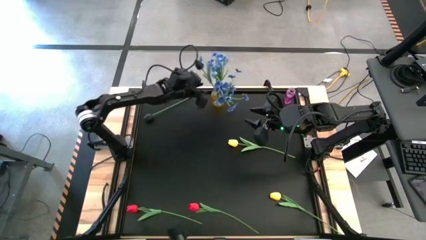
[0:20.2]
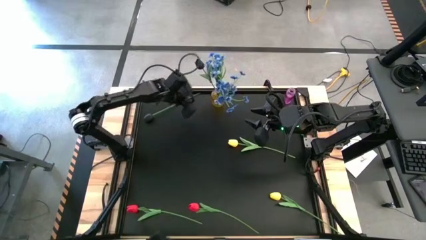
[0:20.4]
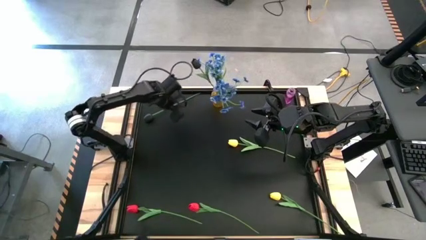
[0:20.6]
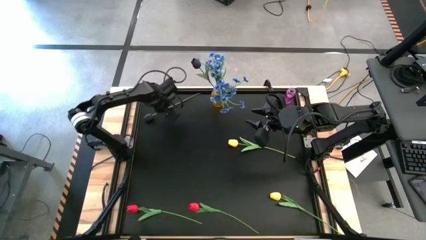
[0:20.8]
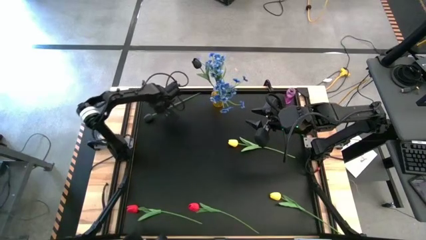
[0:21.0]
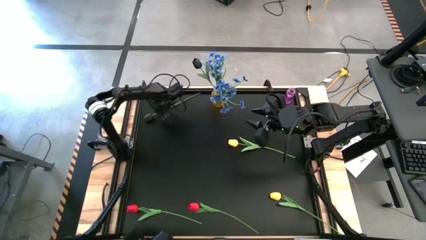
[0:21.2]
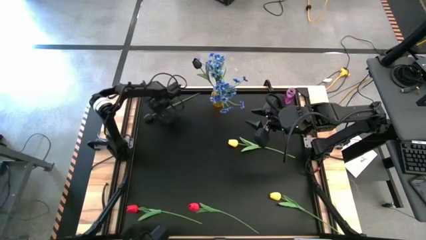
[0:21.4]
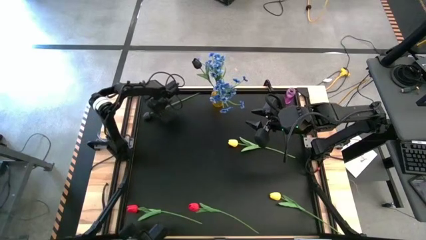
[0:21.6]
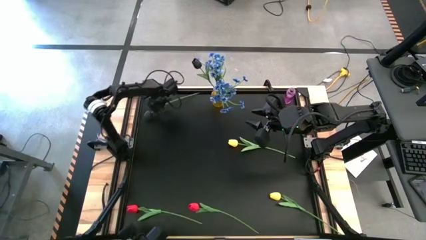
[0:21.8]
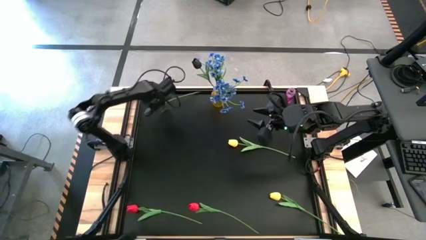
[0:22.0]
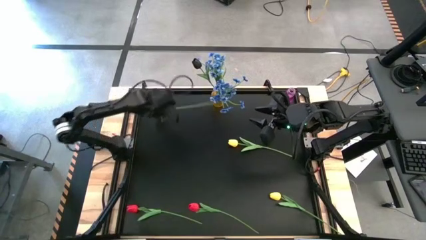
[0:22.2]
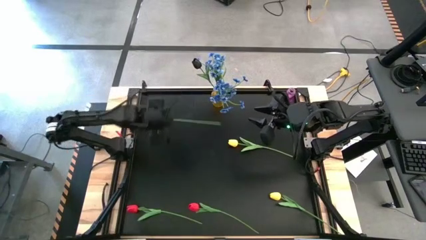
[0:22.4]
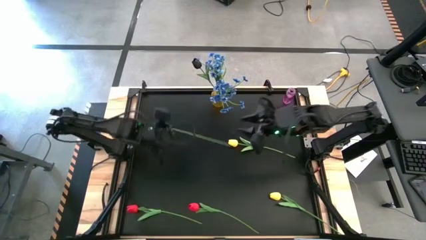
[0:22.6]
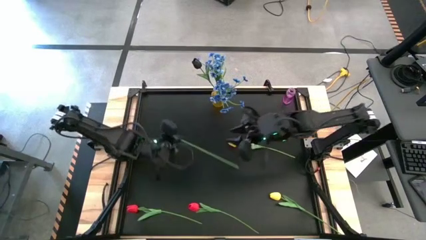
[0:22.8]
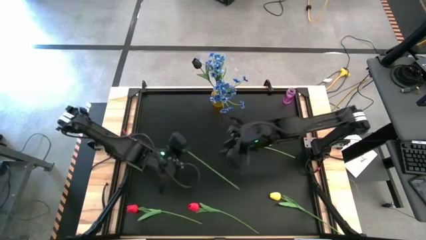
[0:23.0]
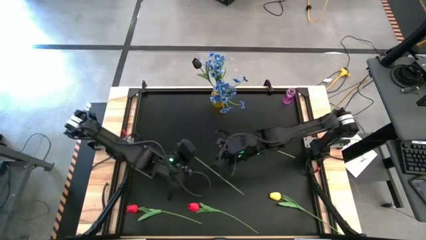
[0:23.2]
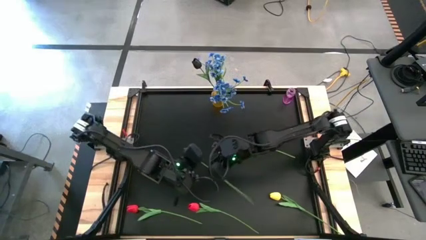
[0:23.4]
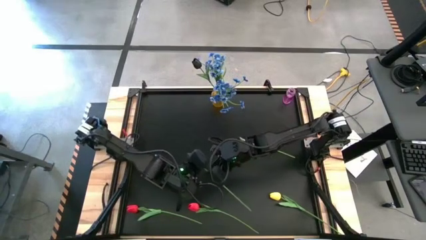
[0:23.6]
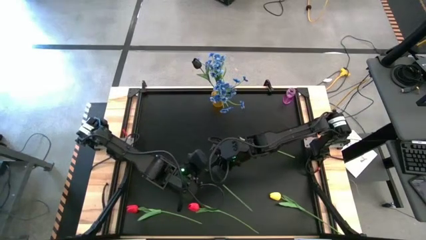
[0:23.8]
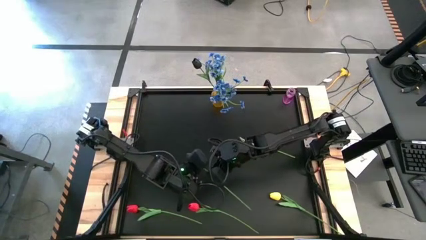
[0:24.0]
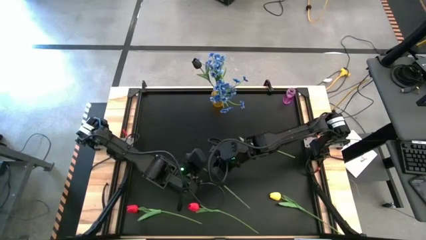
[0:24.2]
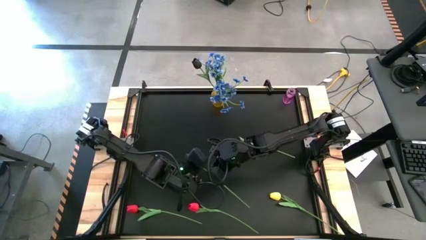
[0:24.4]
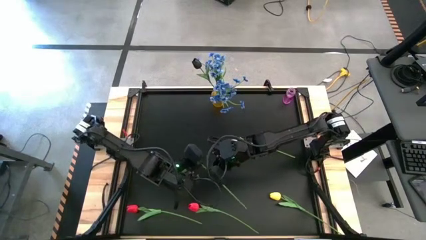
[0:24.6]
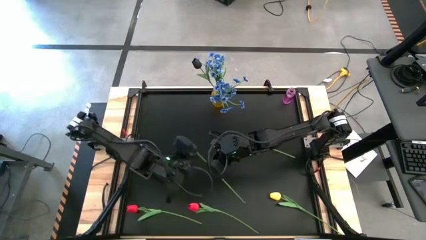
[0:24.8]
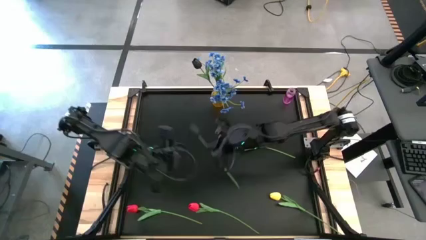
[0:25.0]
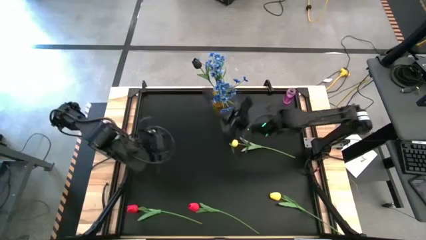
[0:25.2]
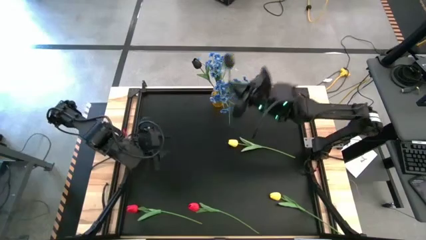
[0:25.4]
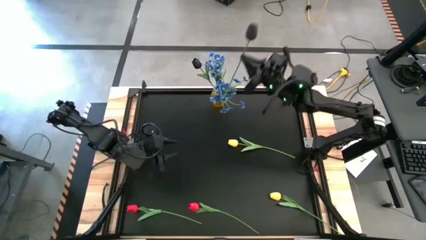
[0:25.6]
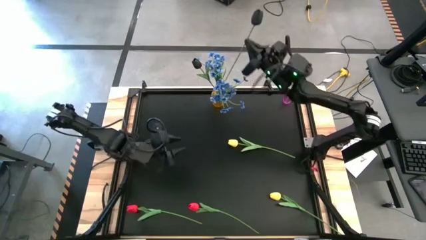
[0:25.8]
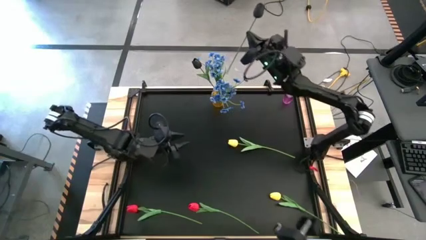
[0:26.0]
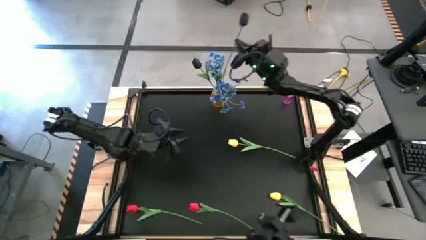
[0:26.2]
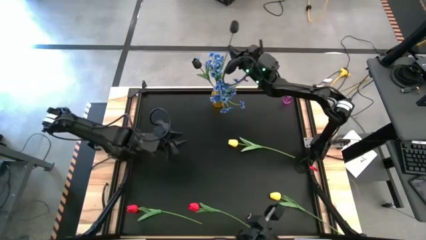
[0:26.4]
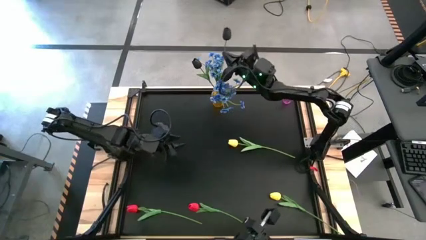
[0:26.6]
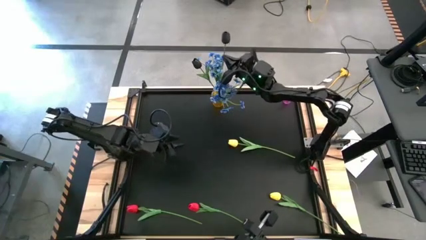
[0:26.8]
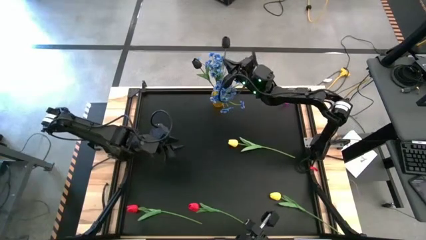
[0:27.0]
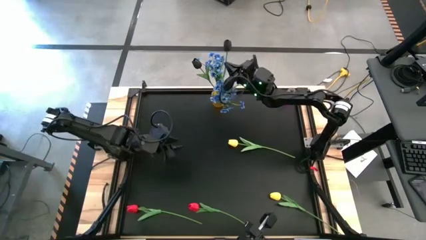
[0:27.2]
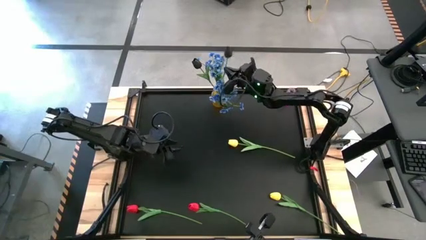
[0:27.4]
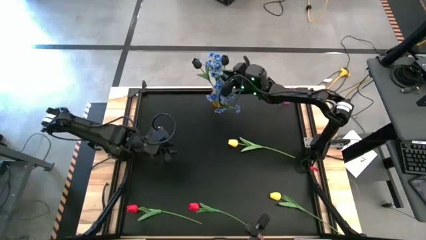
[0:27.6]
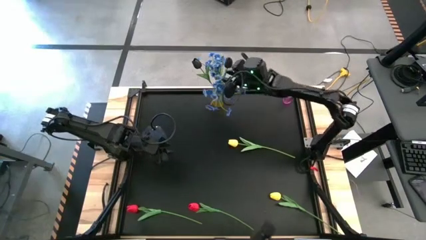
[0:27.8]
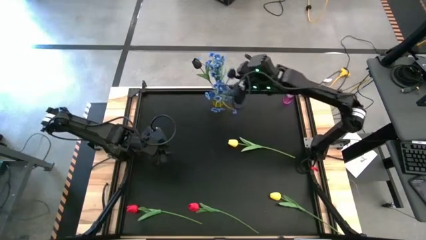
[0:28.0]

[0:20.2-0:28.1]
Task: Sort flowers into vase by color
Put the black flower into the yellow vase

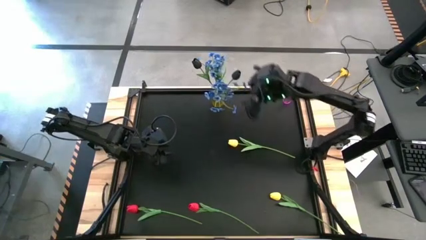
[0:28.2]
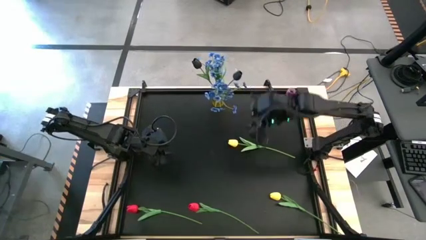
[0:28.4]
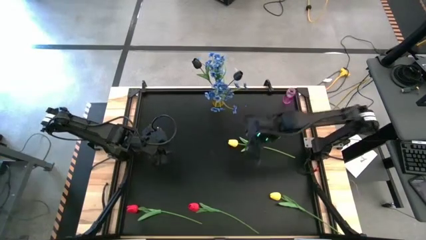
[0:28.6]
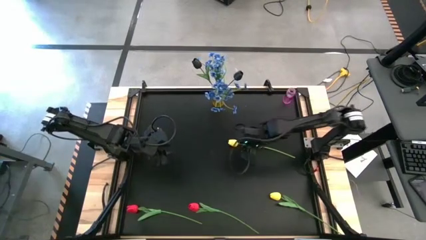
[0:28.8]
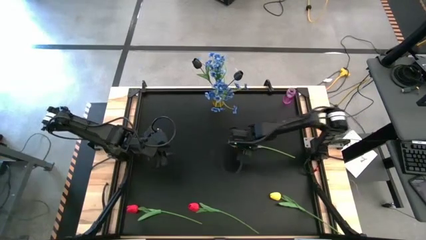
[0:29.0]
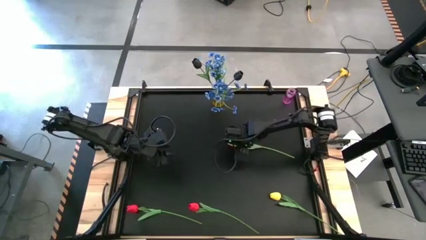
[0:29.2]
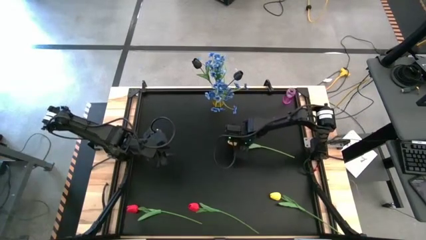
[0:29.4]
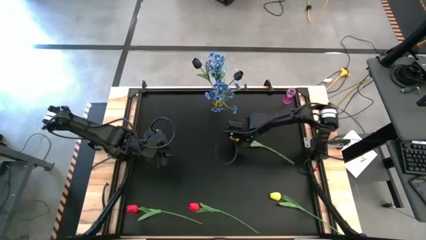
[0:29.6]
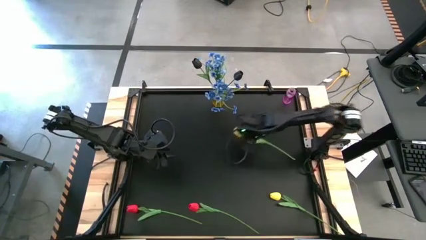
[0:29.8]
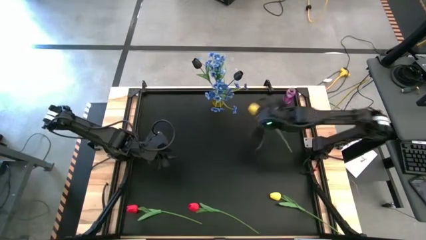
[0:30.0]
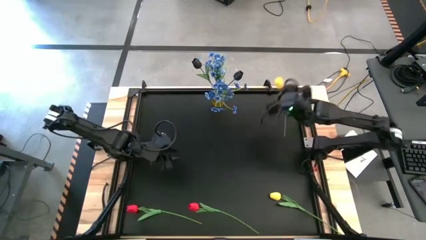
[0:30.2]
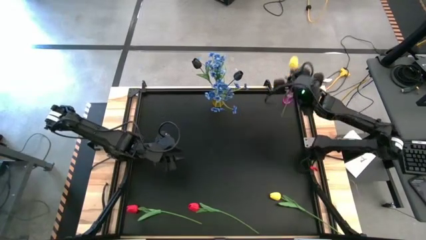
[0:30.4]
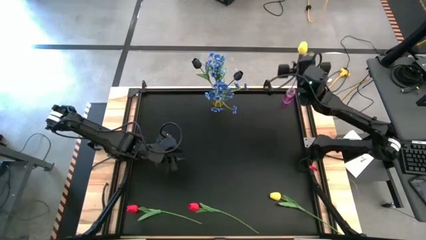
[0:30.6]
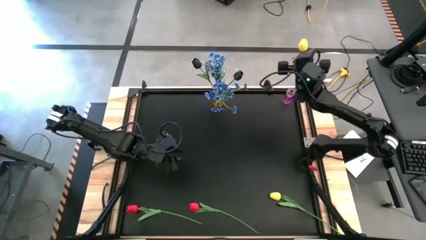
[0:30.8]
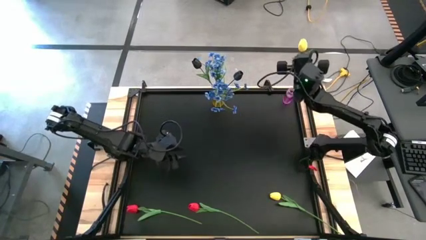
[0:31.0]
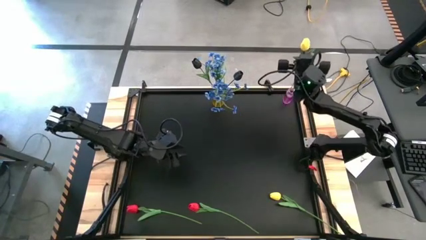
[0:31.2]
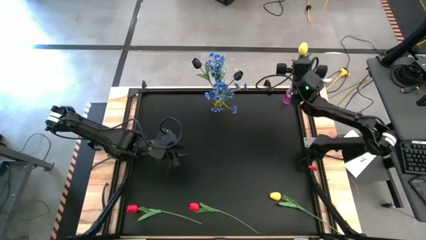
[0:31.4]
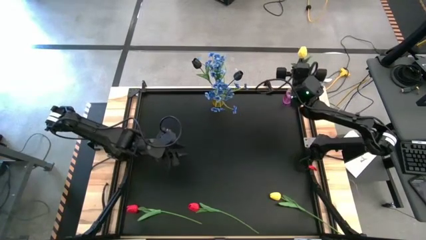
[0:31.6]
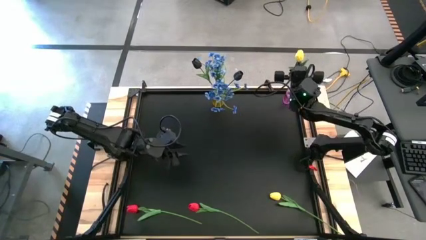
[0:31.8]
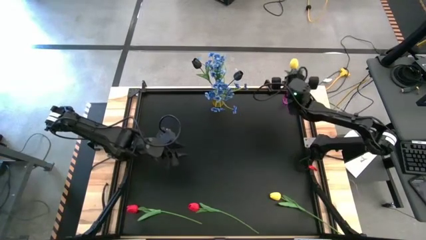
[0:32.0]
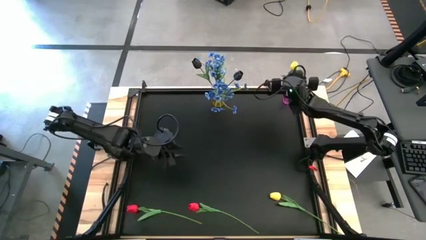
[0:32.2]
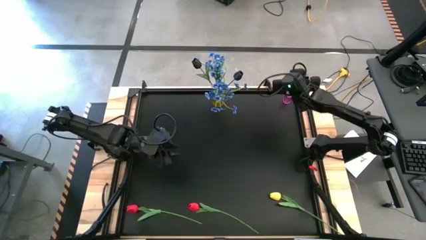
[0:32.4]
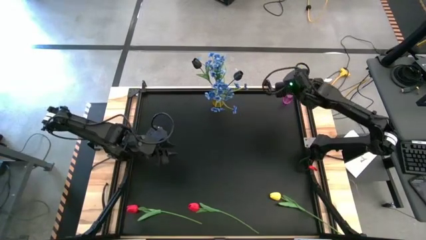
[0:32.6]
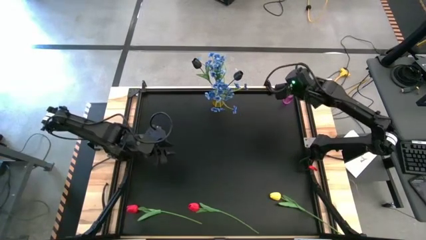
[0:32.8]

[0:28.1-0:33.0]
Put the top yellow flower into the pink vase

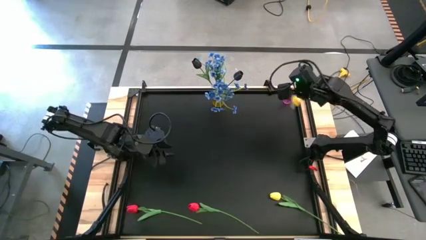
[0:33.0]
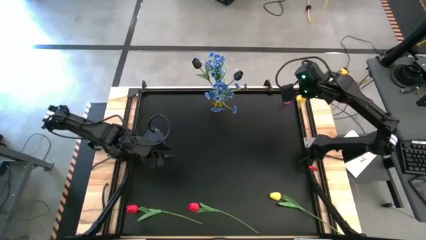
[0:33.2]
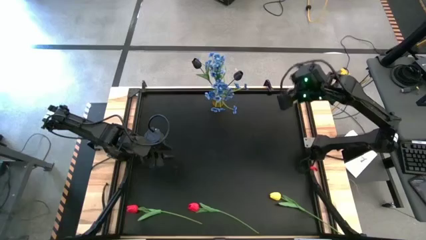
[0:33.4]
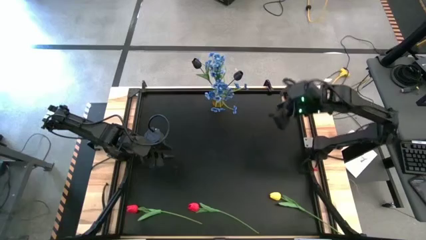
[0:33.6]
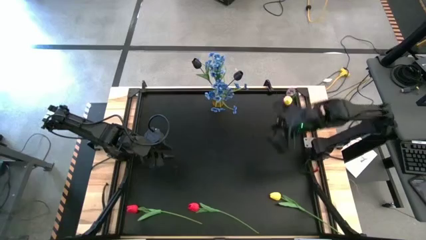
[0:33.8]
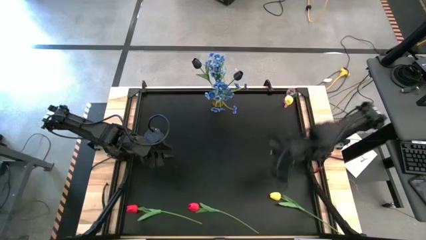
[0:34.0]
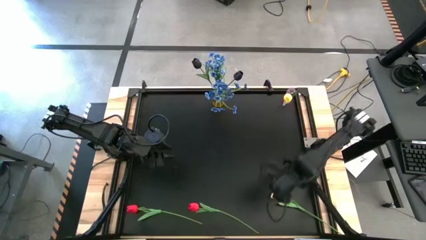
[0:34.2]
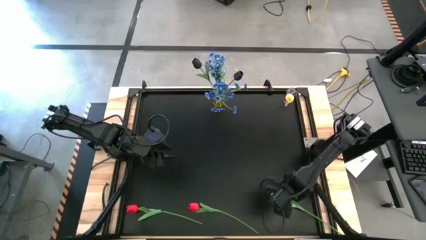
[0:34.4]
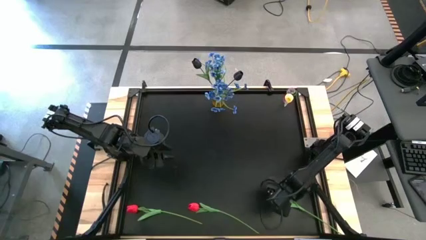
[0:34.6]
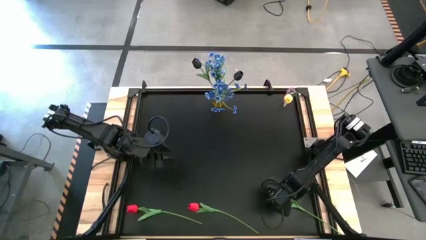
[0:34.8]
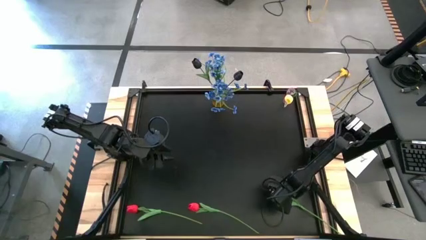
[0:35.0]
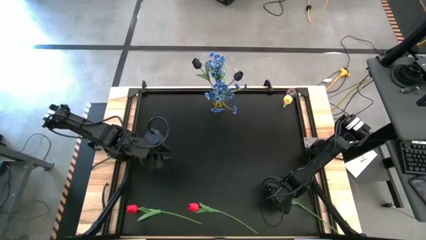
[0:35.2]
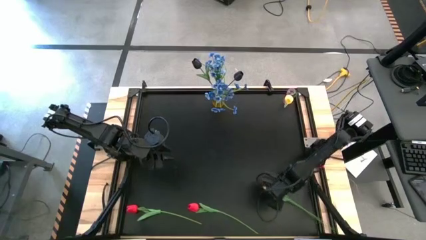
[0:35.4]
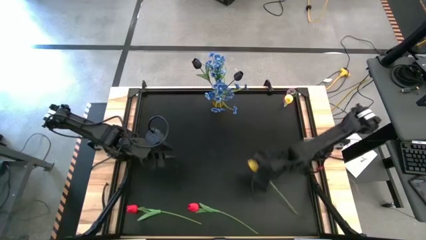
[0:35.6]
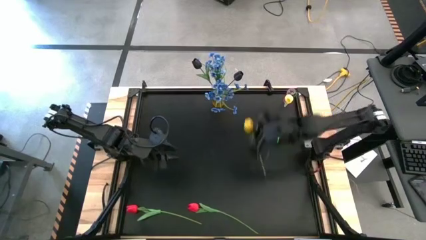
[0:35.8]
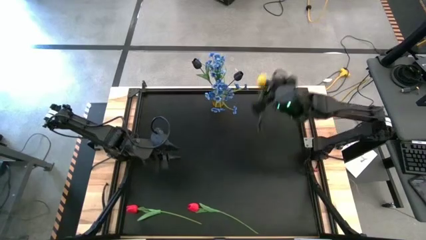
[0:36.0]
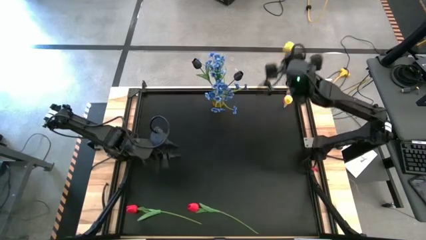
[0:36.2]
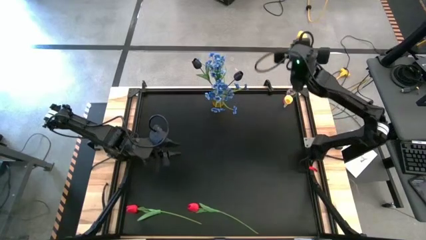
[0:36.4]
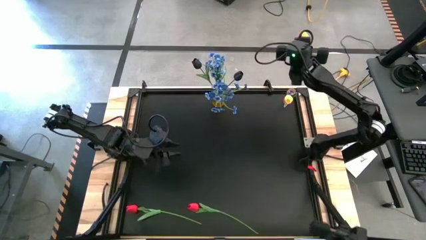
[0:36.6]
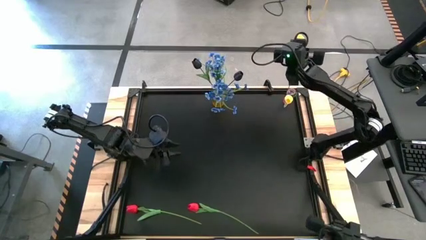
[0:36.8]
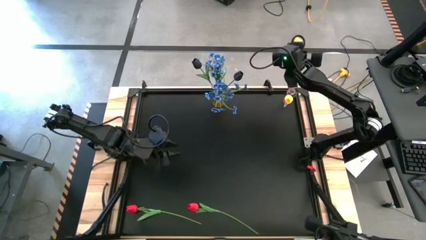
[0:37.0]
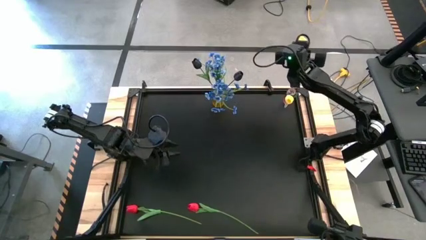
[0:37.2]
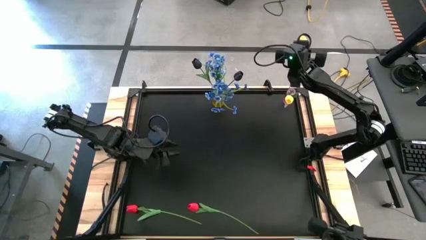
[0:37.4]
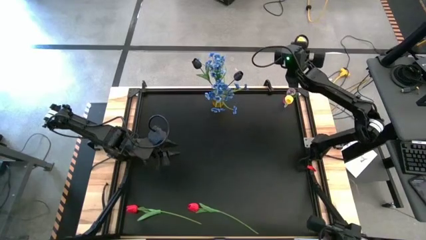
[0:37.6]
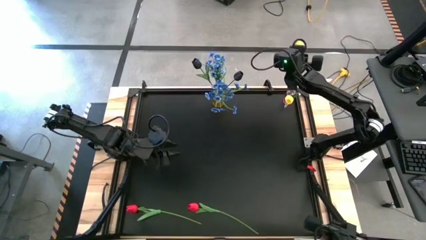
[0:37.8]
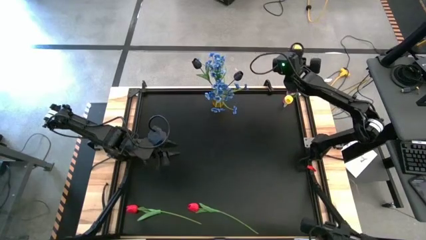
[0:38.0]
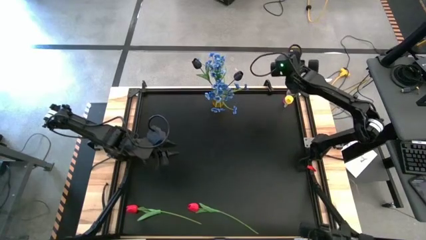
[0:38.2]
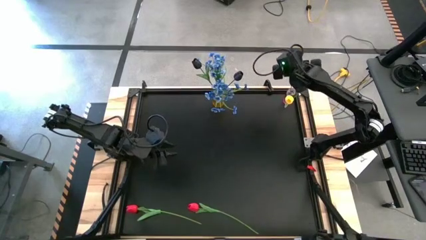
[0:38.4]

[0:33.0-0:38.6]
Put the yellow flower into the pink vase
